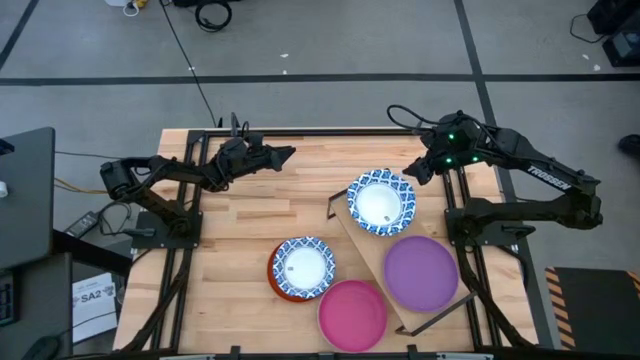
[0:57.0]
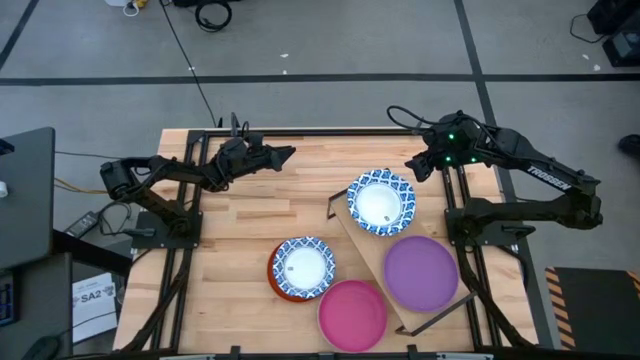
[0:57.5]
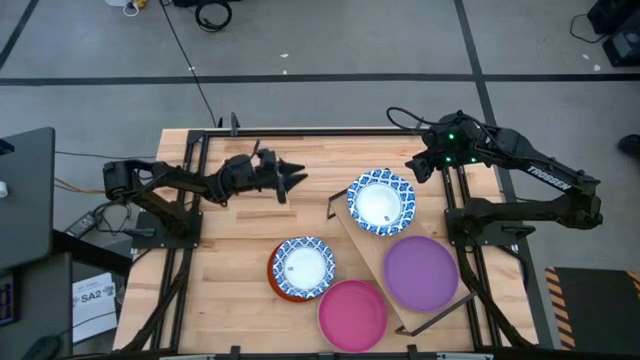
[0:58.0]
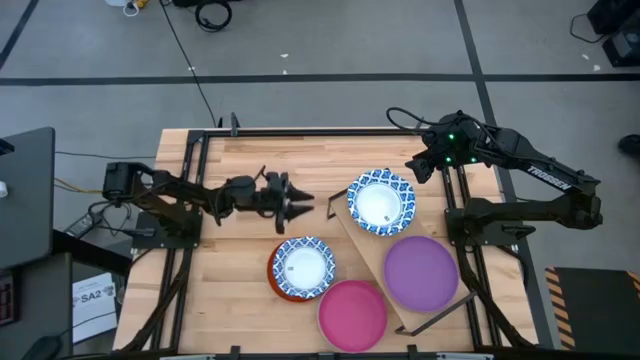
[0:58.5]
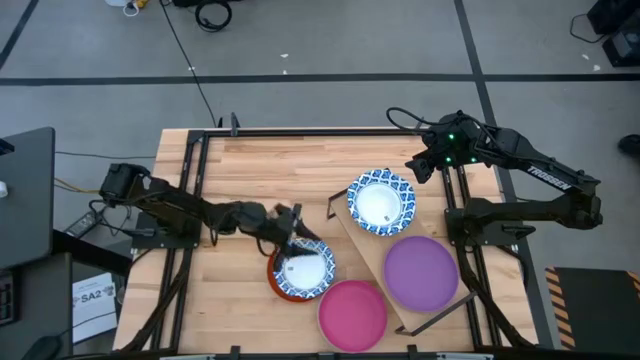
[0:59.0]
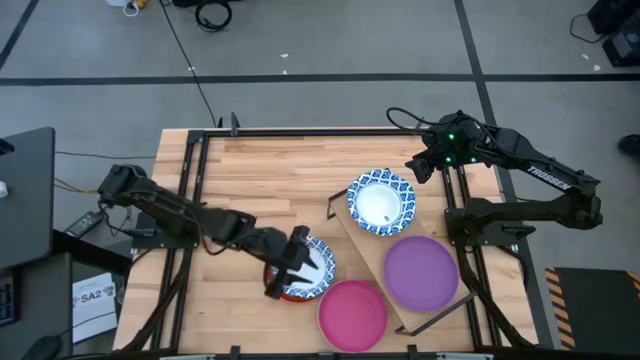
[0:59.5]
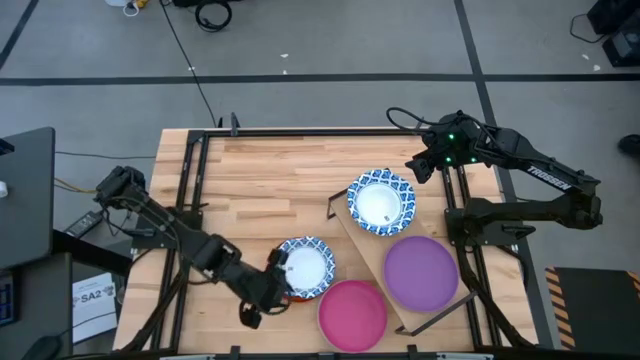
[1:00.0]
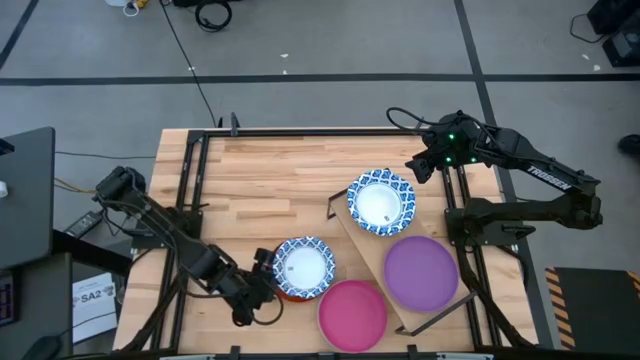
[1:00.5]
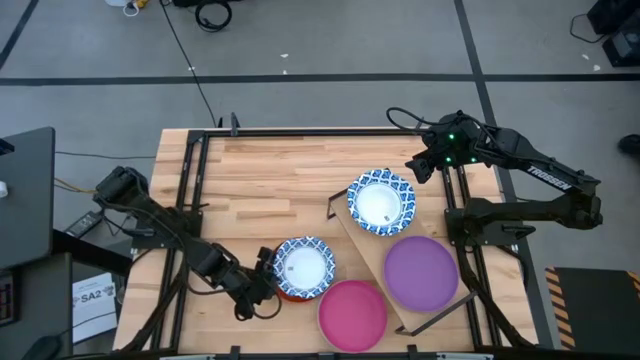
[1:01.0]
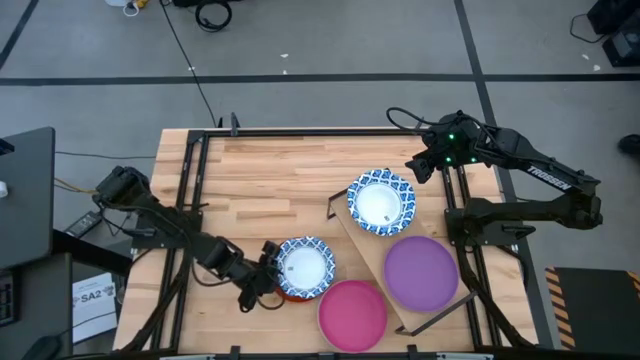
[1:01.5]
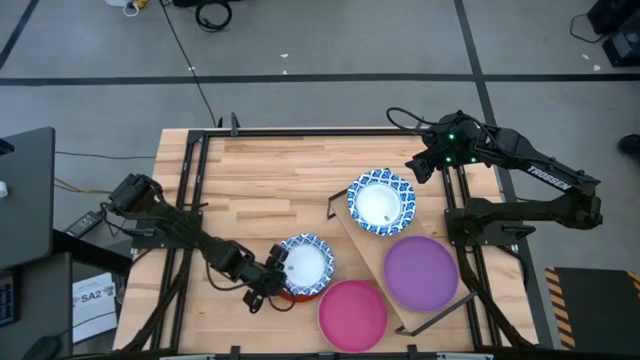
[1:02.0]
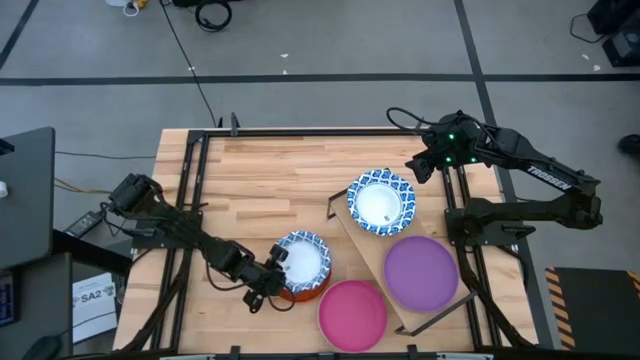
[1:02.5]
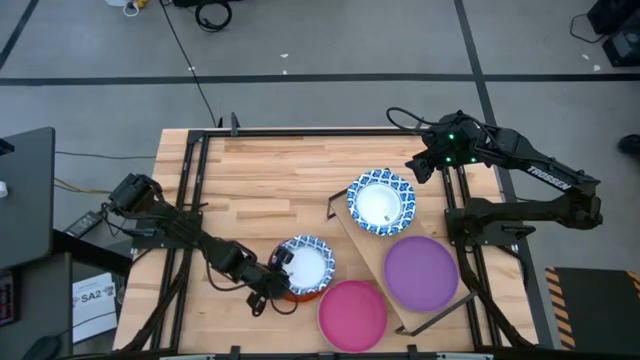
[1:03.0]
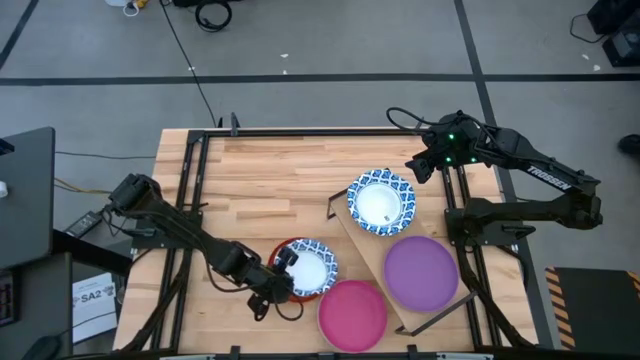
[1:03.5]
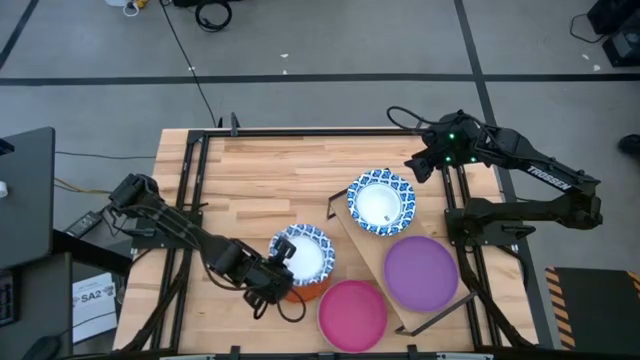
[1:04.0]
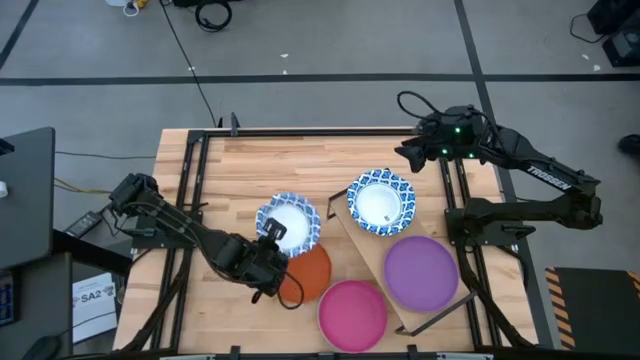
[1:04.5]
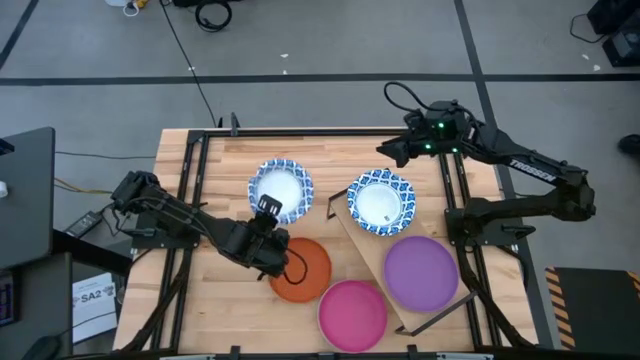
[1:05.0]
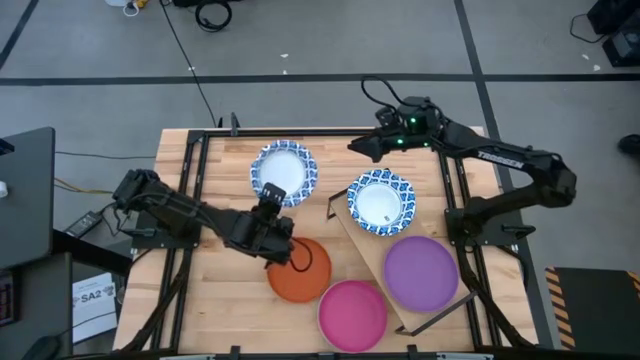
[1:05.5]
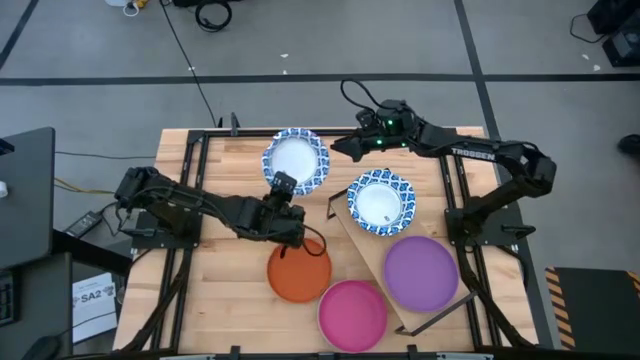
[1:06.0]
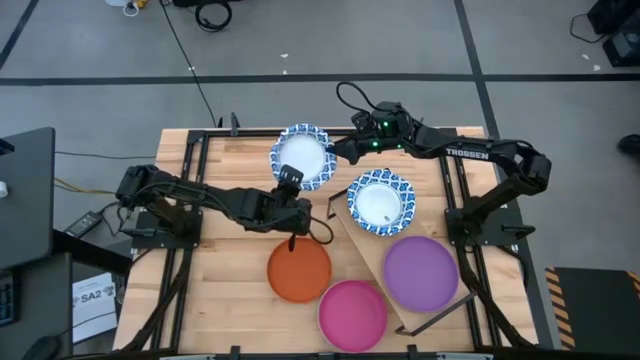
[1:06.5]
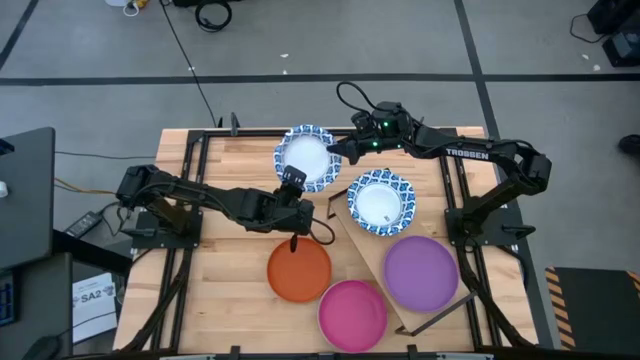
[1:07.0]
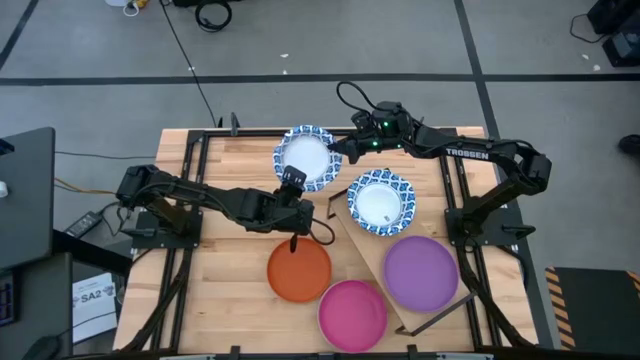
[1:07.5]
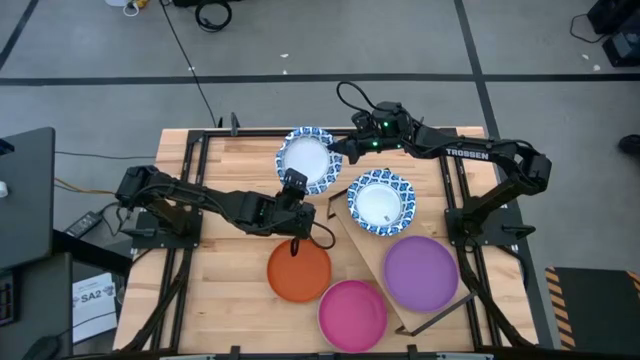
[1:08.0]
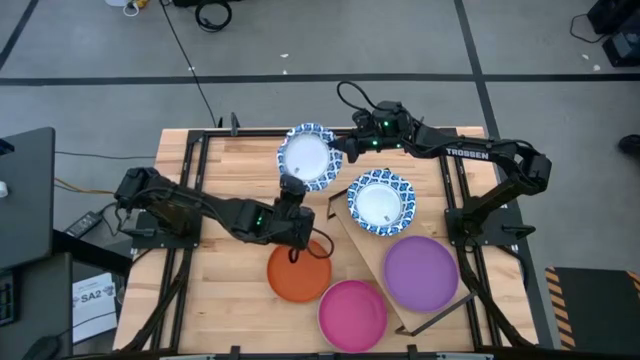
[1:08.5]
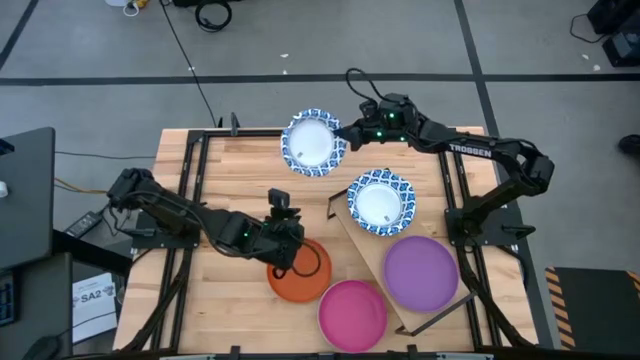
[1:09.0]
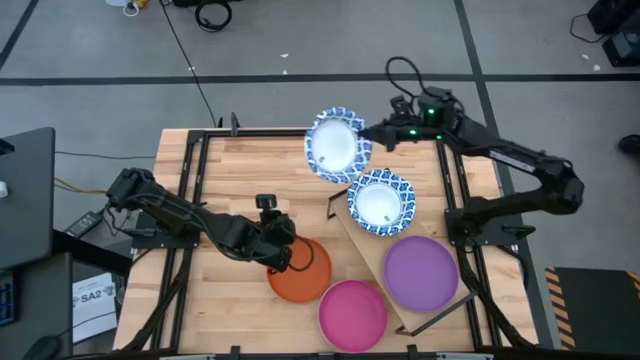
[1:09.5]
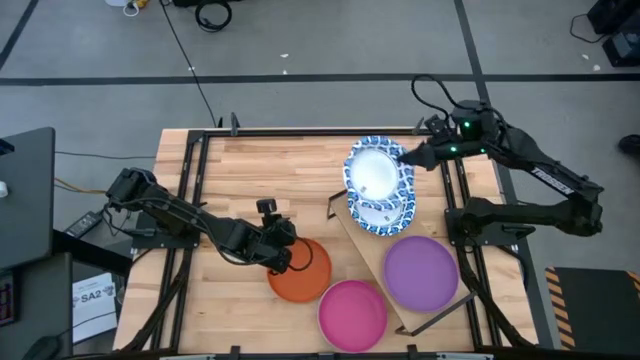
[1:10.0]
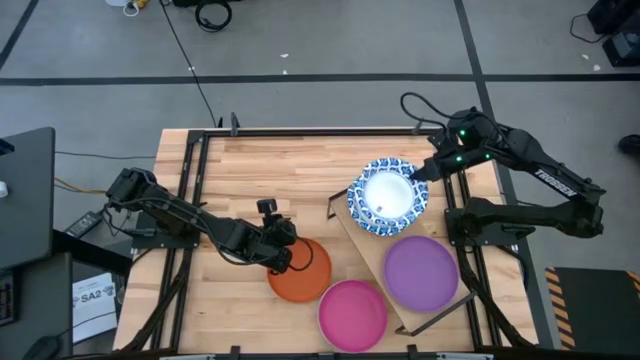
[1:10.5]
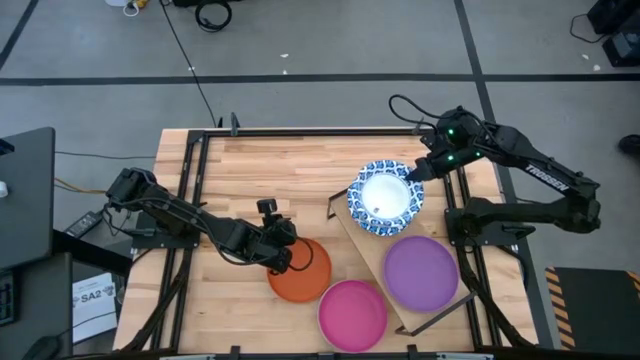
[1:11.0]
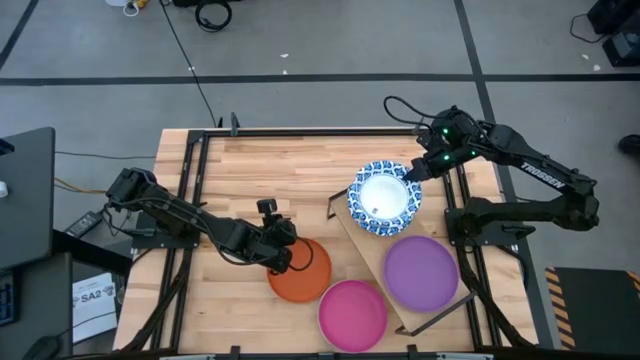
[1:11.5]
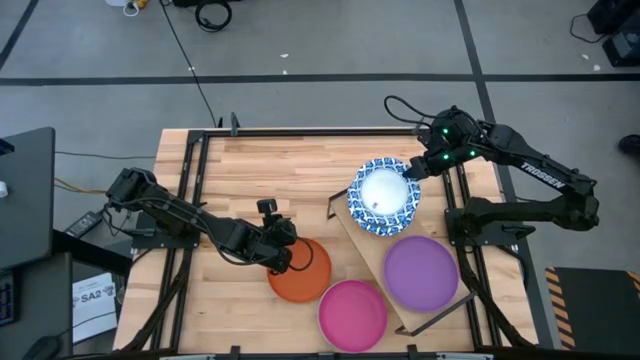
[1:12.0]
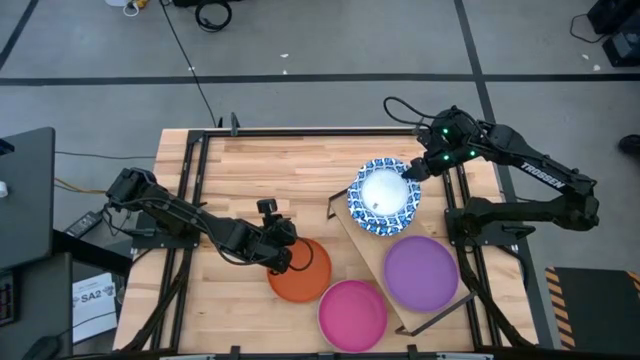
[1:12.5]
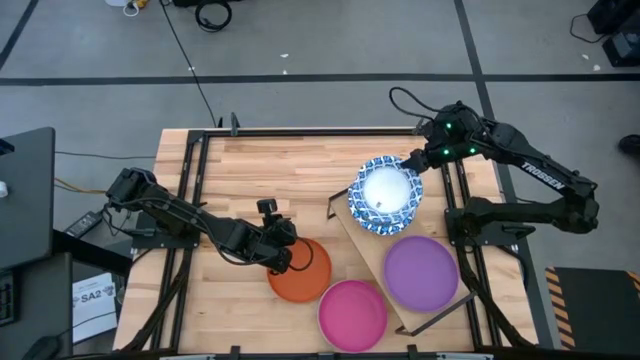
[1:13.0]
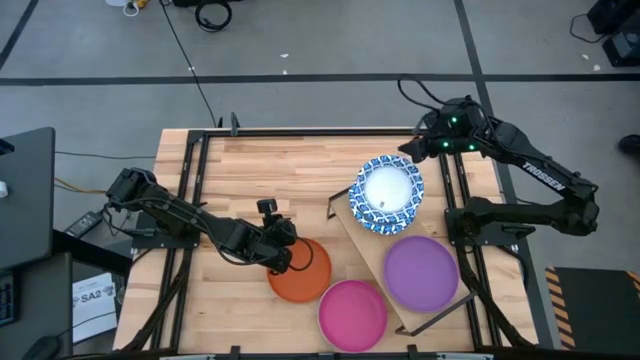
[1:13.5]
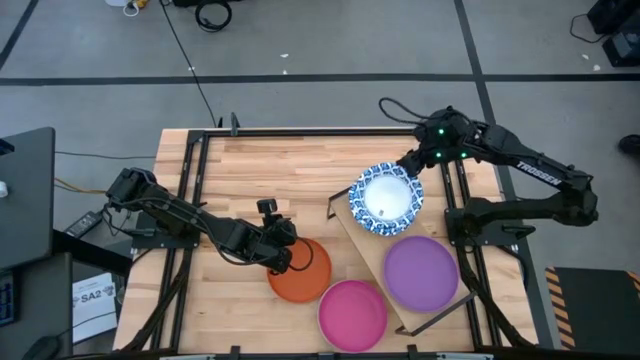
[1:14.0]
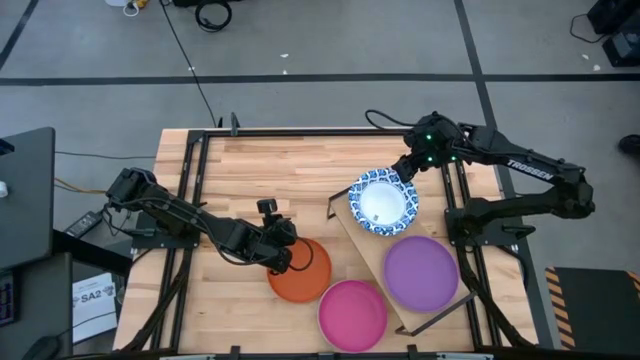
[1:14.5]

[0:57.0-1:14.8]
Task: Place and stack plates onto a shelf
Stack the white bowl on top of the white bowls on the shelf

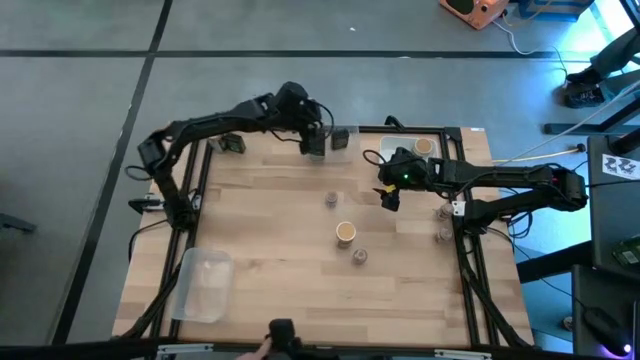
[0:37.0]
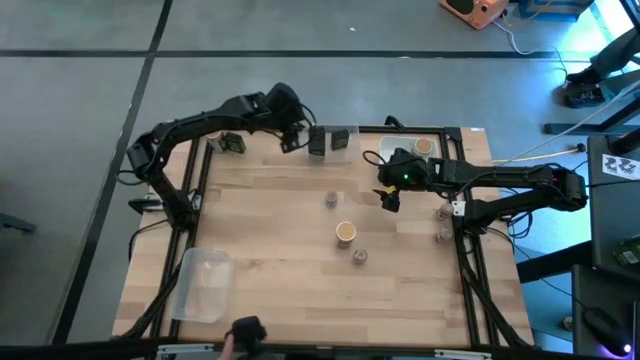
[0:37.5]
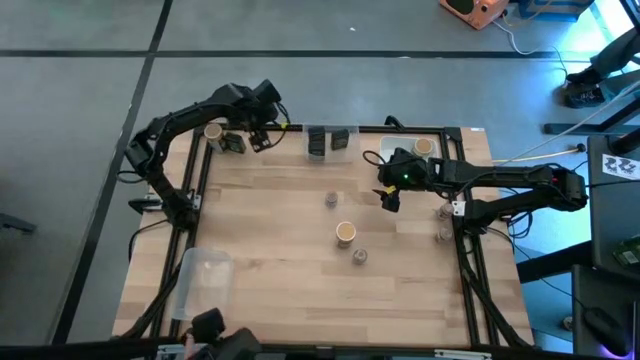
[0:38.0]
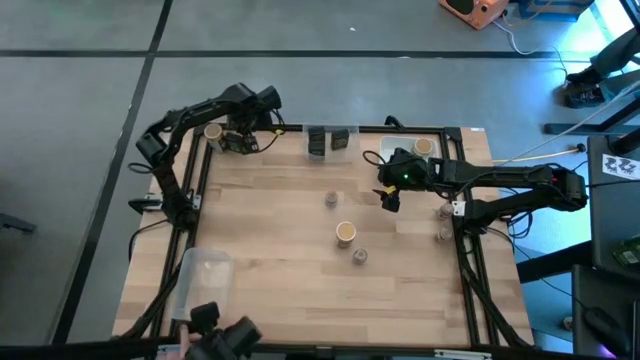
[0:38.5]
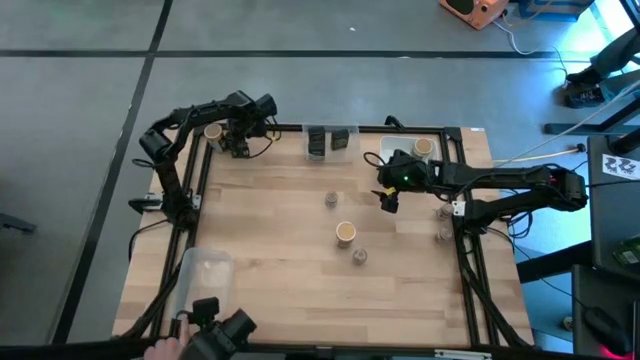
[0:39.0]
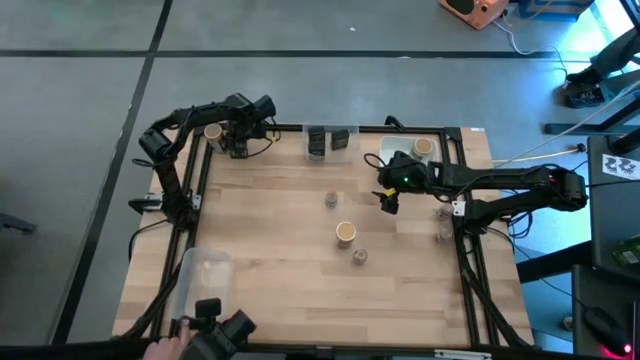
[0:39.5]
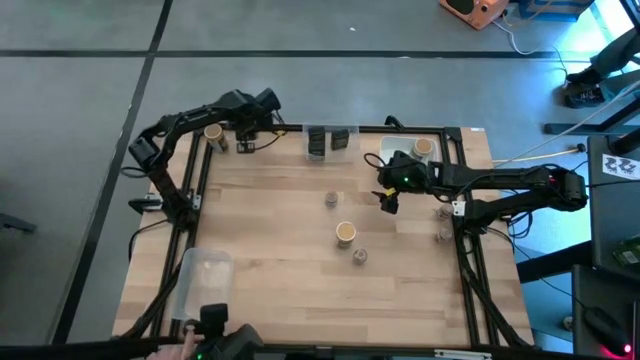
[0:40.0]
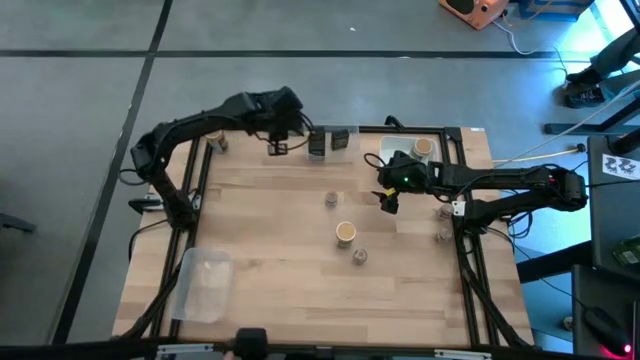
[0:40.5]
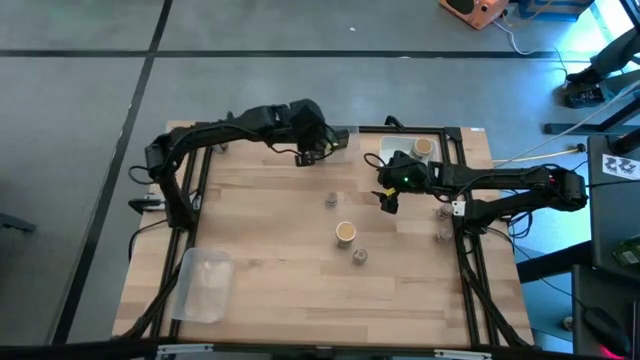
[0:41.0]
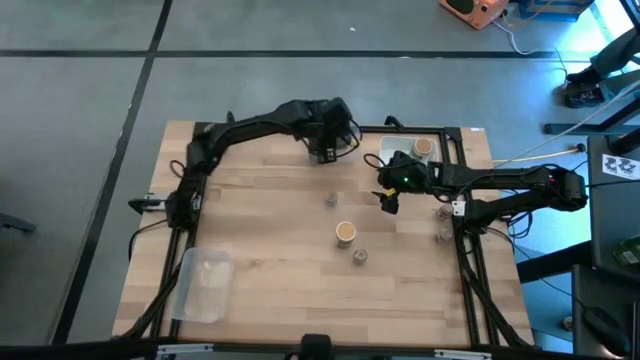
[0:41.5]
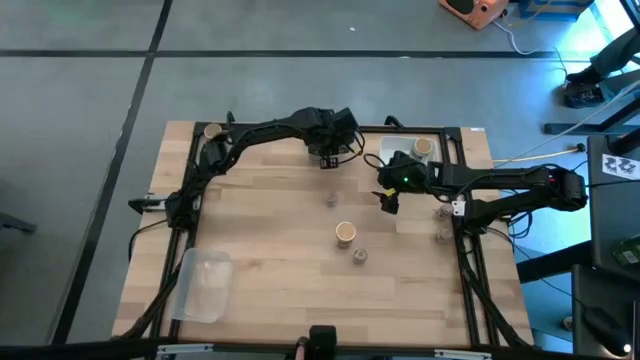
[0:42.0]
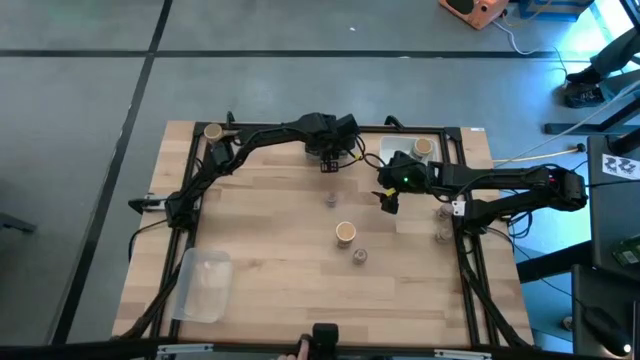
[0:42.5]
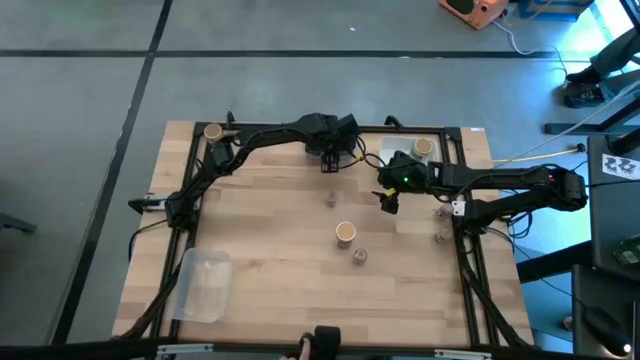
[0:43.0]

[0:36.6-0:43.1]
Task: Sort spices by type
Put the black seasoning can into the top transparent bin
